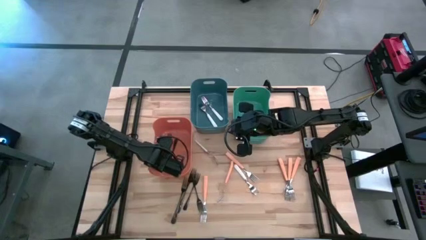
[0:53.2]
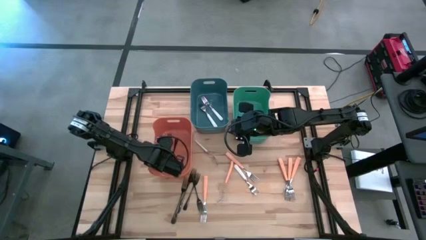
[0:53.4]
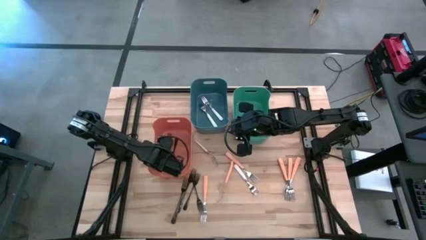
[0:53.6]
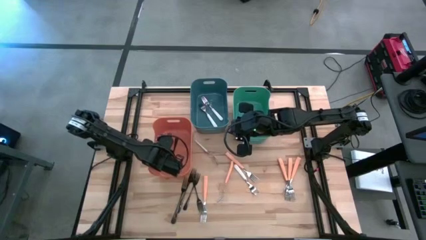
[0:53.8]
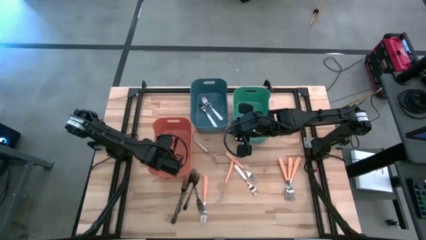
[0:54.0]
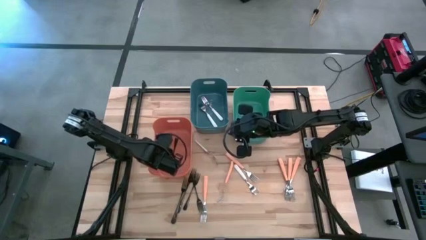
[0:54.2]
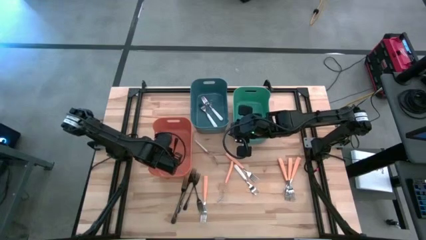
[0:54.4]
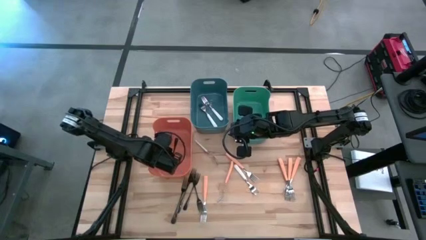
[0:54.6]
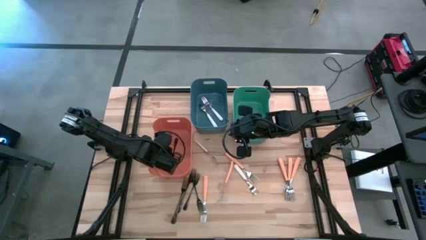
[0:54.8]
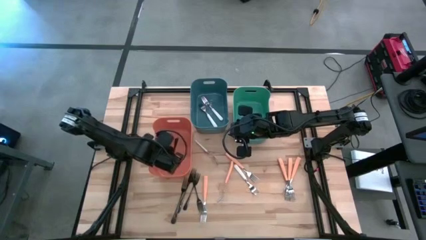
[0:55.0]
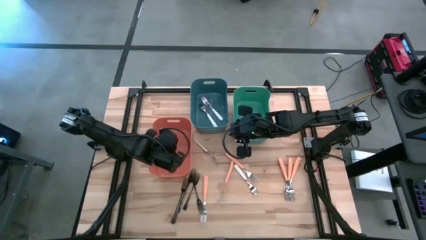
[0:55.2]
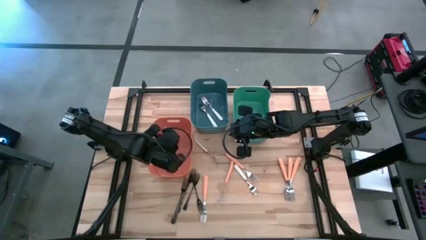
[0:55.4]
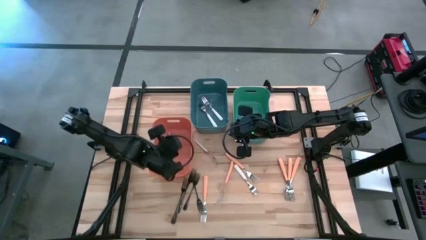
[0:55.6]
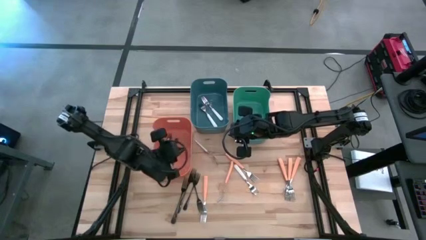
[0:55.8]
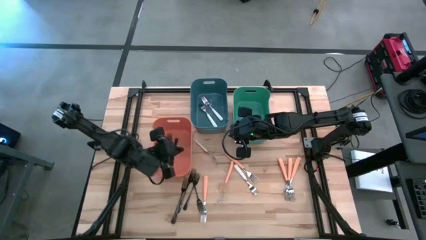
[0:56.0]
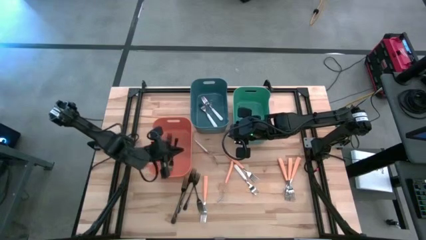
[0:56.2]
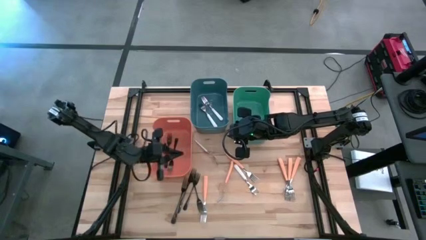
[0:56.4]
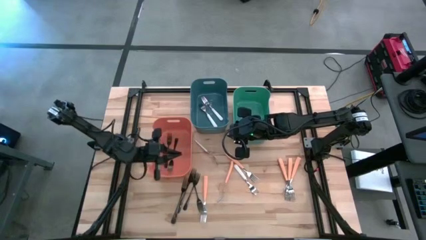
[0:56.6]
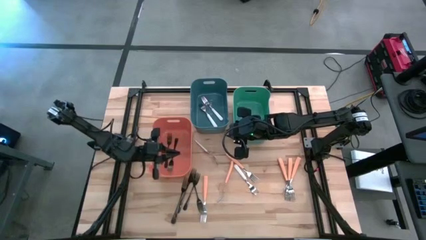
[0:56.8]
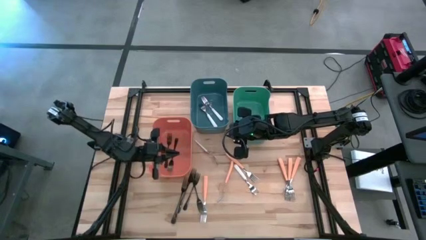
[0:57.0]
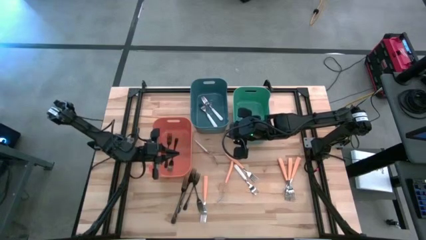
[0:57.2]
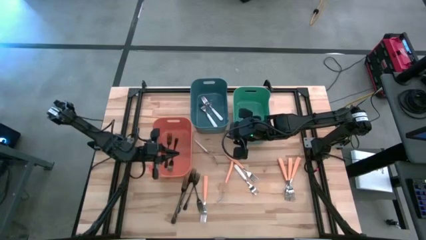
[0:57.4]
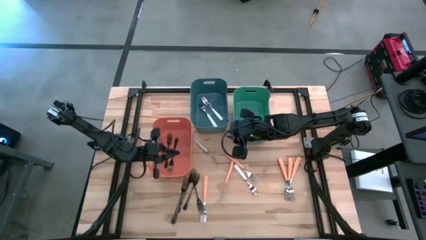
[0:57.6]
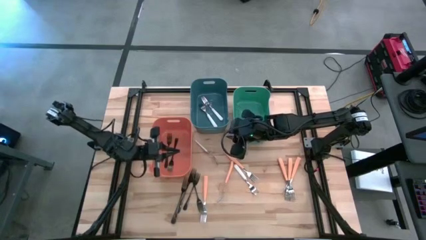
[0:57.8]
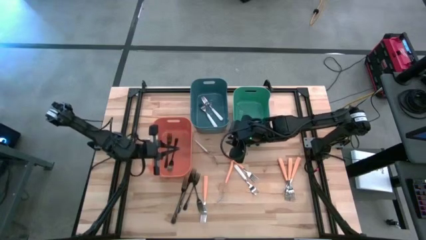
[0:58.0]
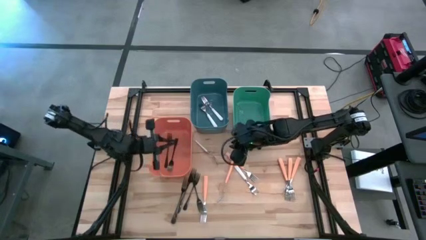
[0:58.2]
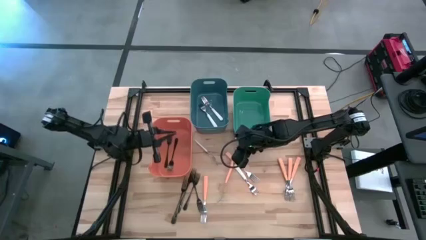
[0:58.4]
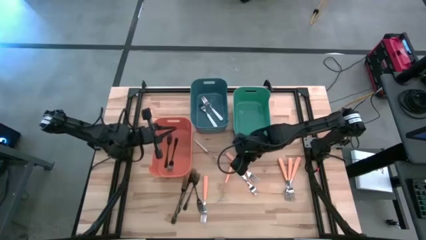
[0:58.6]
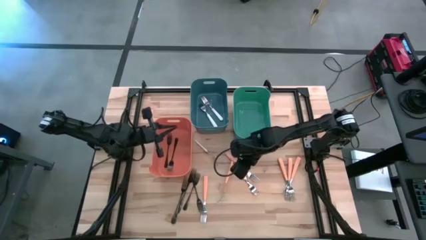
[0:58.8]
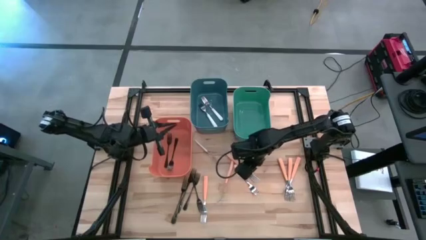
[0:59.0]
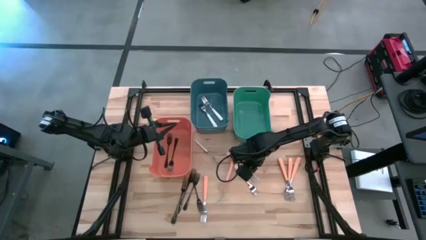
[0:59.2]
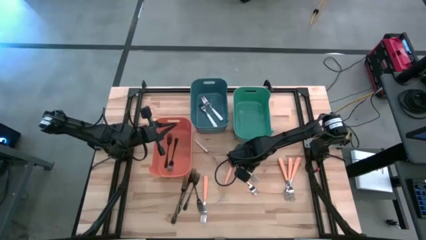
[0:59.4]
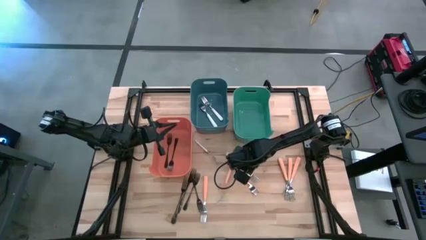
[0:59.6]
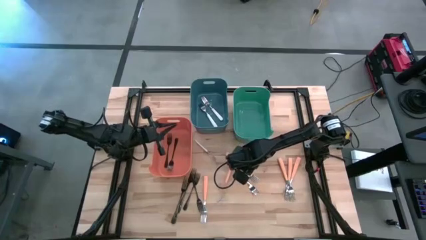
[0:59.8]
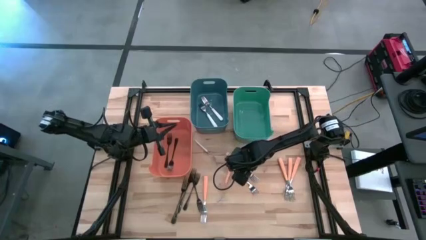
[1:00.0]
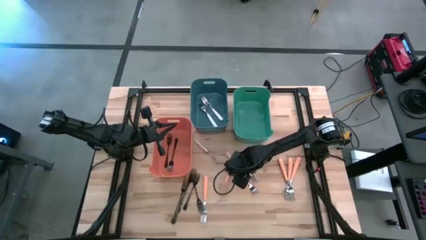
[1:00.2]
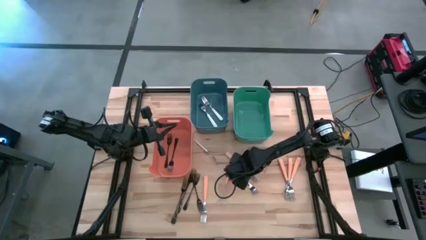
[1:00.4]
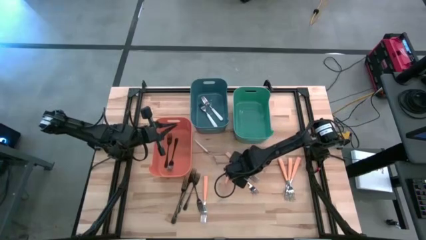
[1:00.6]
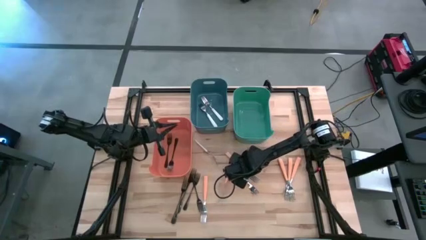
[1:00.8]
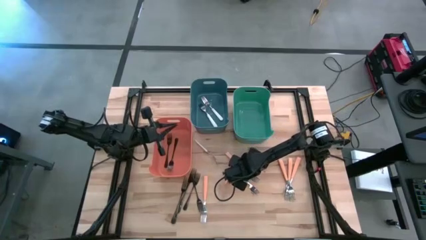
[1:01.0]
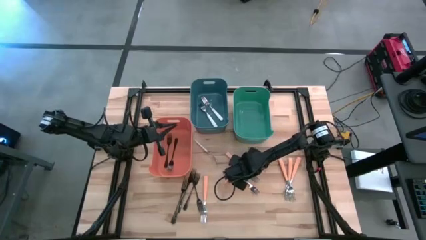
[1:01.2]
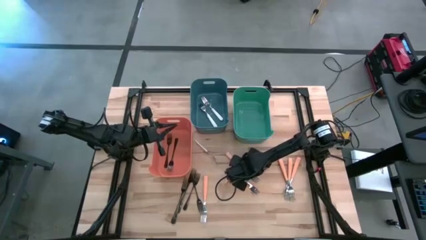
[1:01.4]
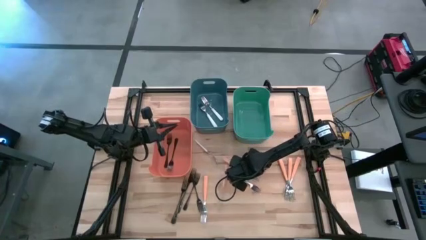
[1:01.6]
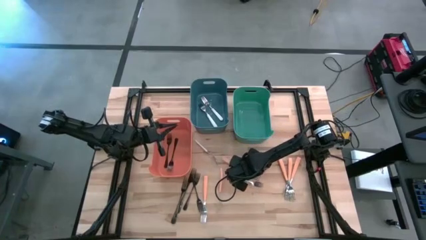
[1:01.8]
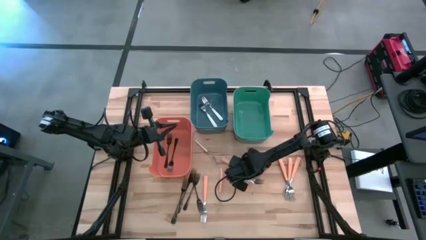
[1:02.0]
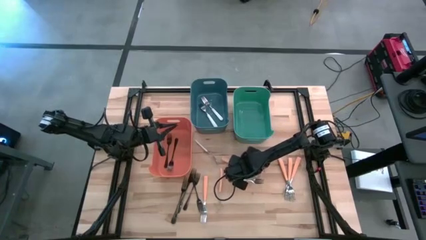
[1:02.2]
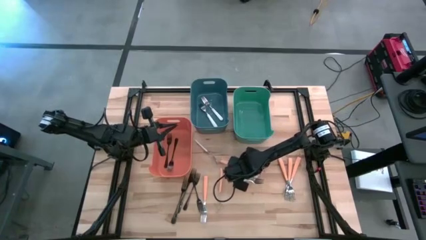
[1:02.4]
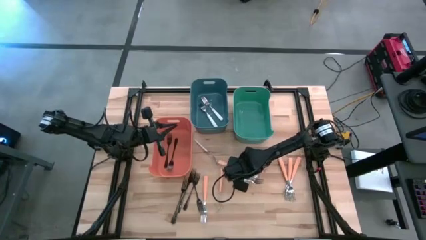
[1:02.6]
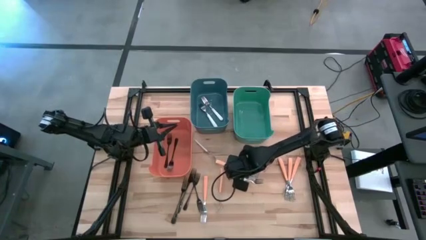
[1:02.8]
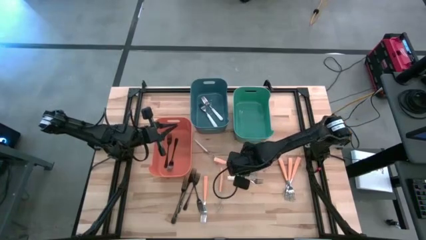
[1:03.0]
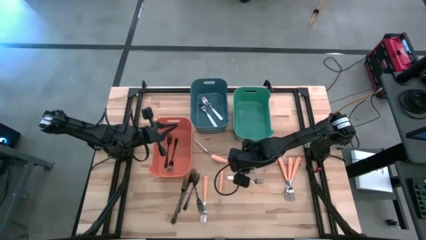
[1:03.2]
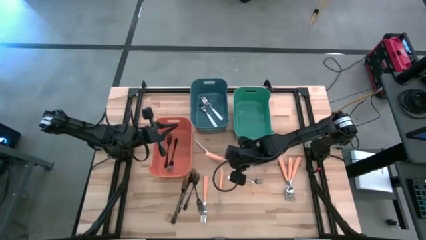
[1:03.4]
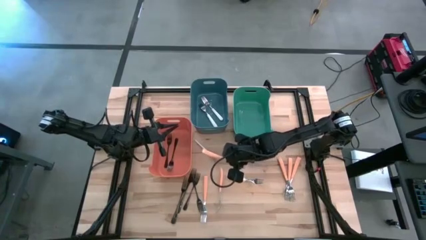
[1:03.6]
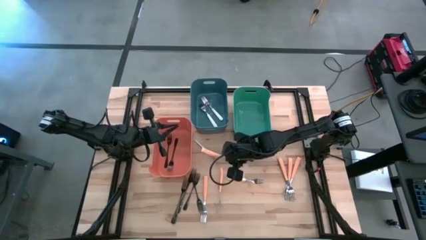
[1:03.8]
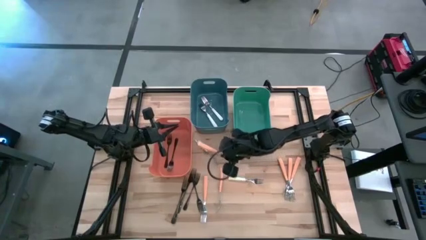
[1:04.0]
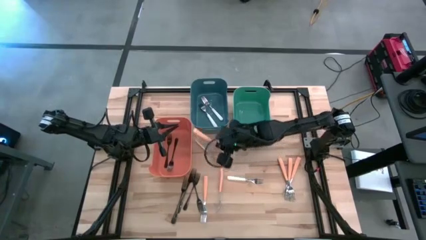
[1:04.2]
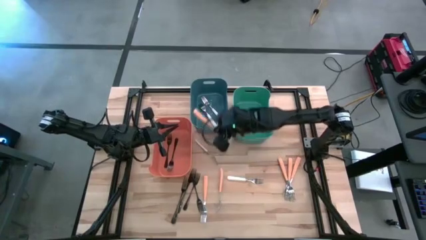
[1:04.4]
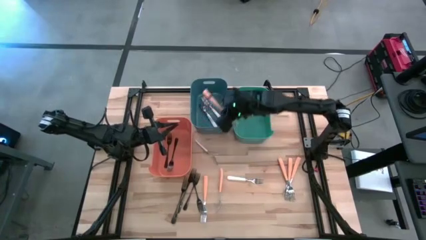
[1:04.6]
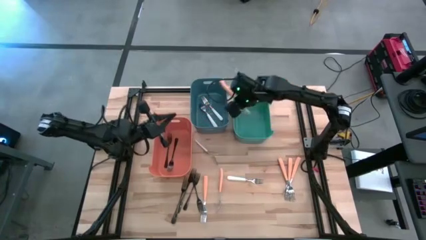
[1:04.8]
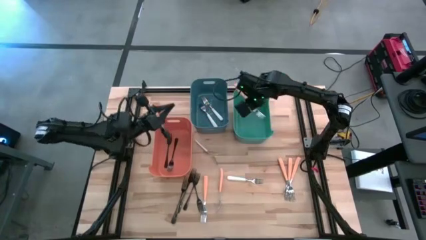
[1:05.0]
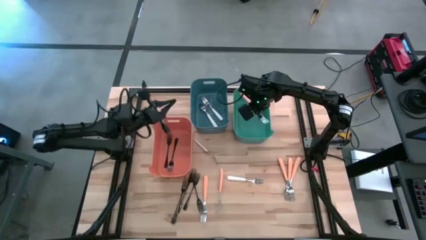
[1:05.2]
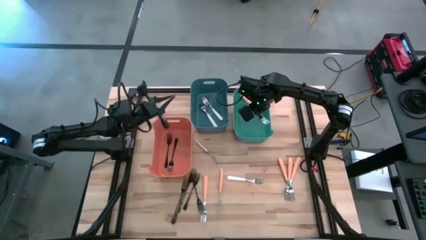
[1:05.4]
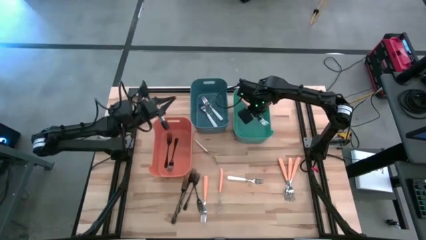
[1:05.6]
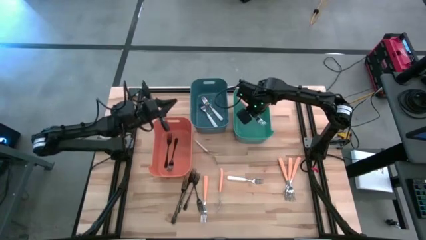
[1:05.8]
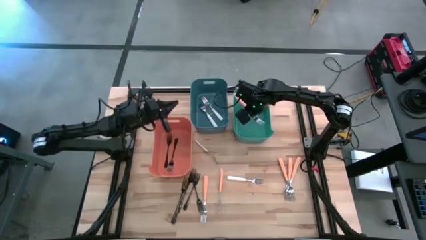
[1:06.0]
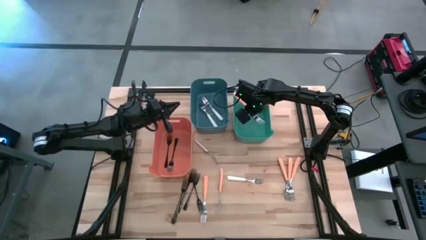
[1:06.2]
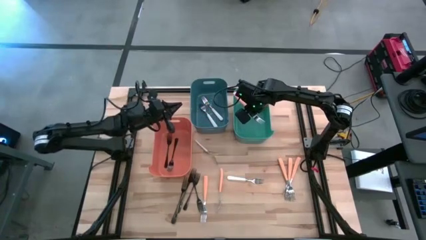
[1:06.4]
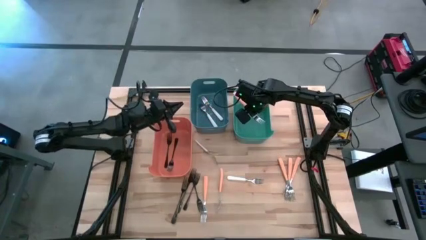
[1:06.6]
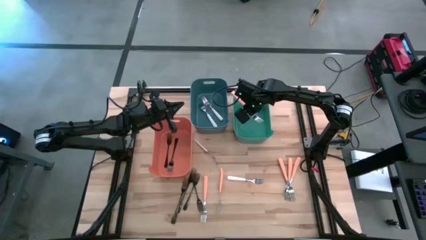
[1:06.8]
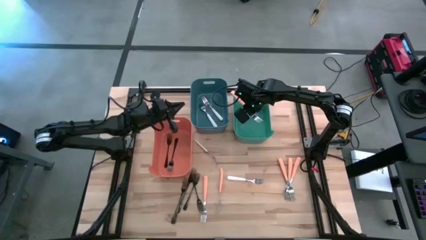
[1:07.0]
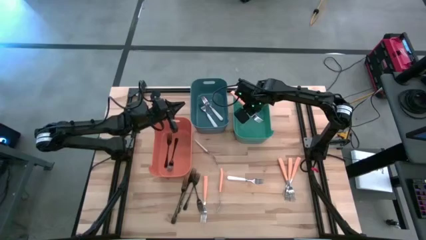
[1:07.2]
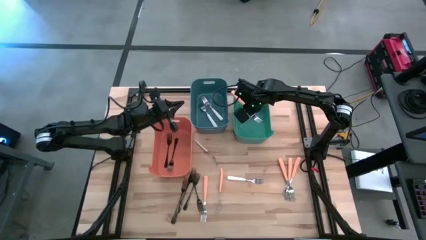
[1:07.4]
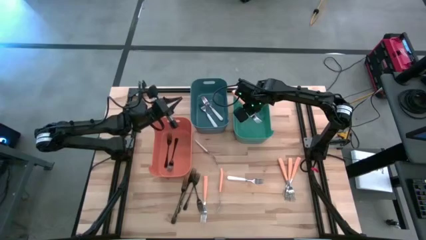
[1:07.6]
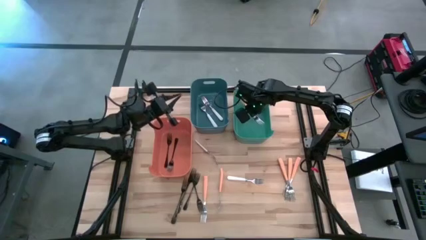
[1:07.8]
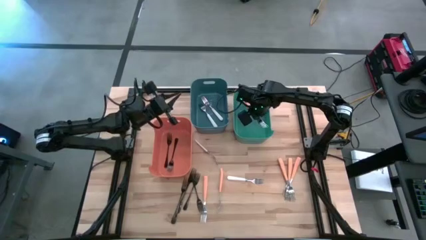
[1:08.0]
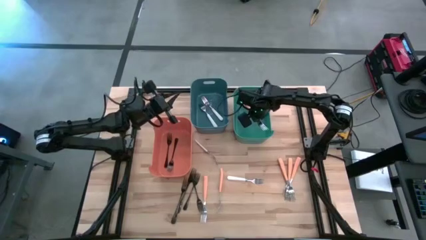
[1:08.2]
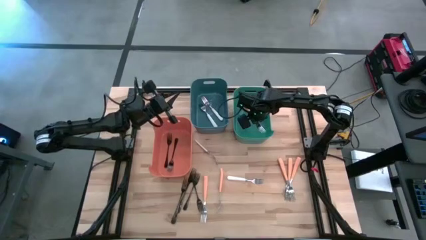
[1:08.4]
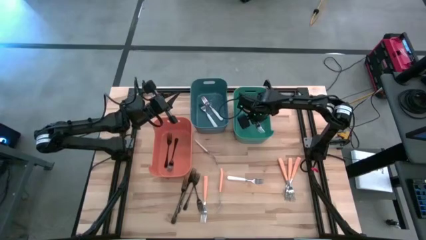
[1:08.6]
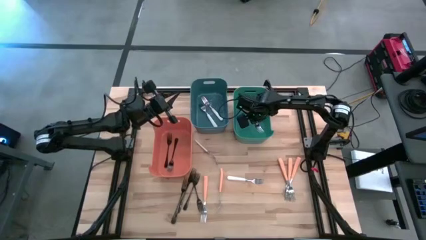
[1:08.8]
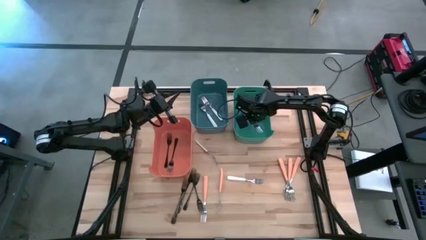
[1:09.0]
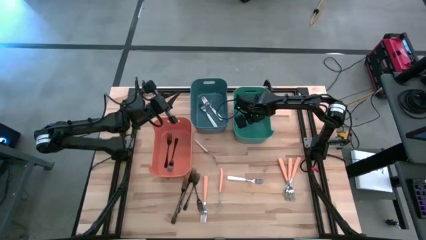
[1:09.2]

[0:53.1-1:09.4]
Task: Sort silverware by color (type)
Put the orange fork into the green bin
